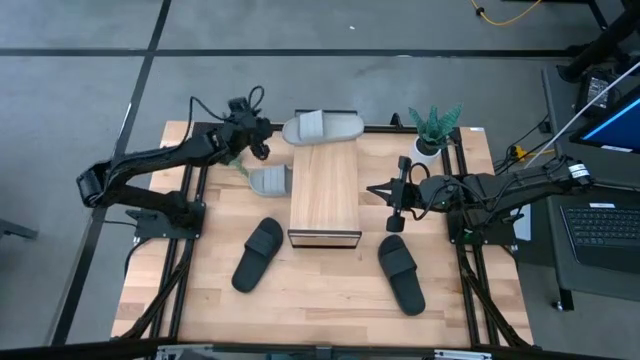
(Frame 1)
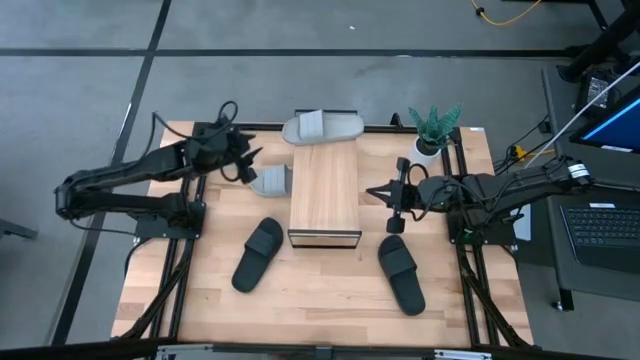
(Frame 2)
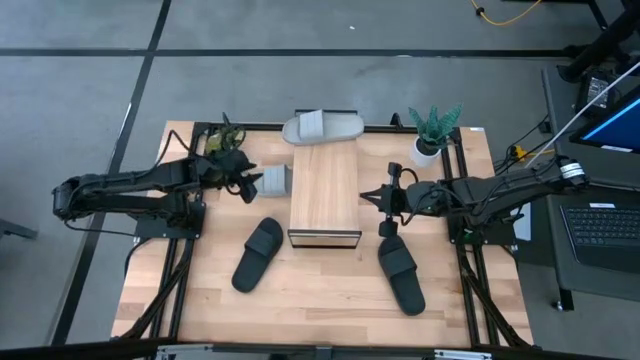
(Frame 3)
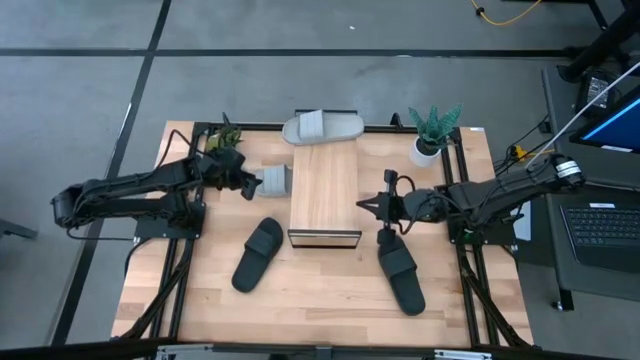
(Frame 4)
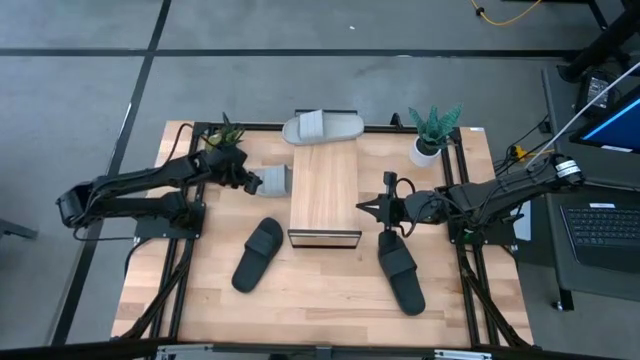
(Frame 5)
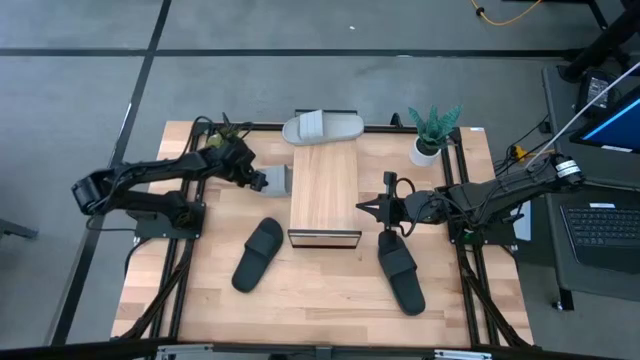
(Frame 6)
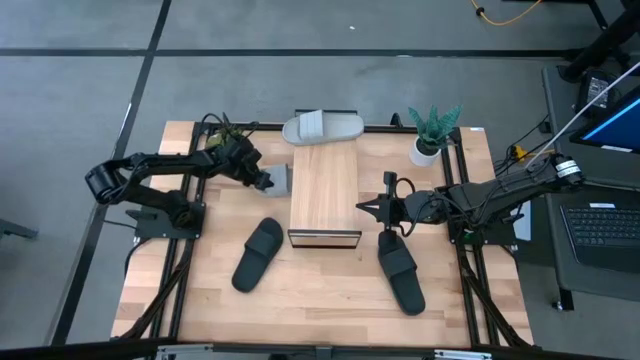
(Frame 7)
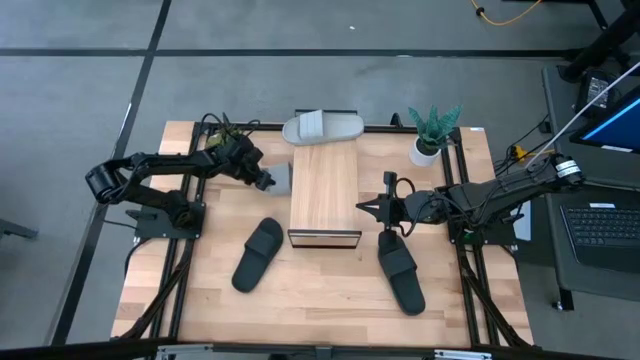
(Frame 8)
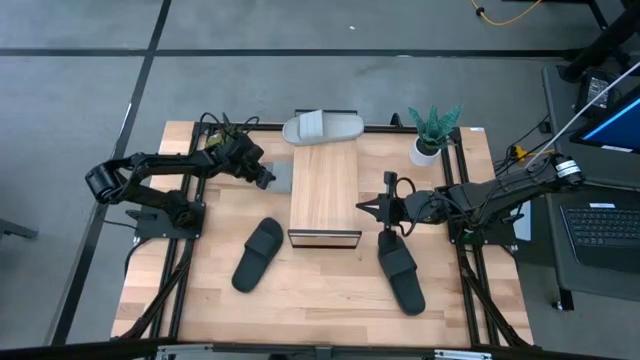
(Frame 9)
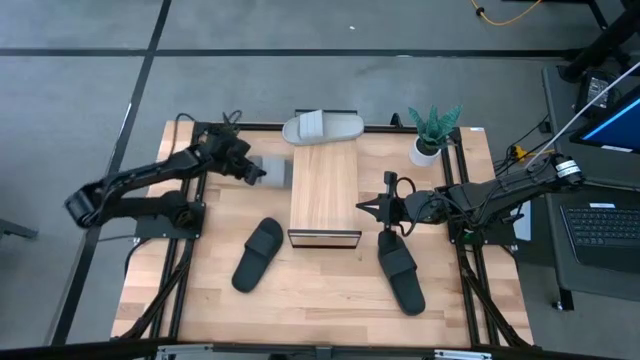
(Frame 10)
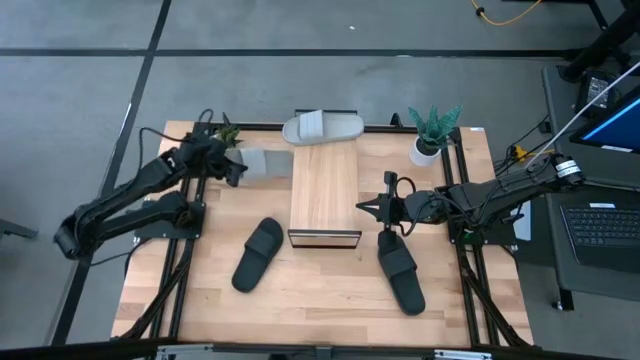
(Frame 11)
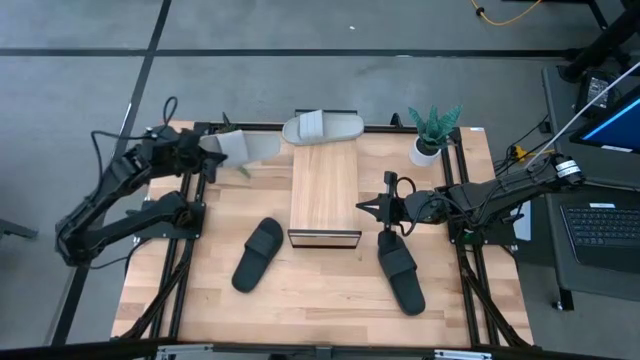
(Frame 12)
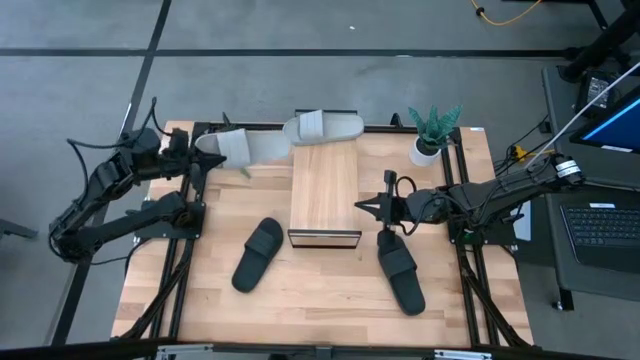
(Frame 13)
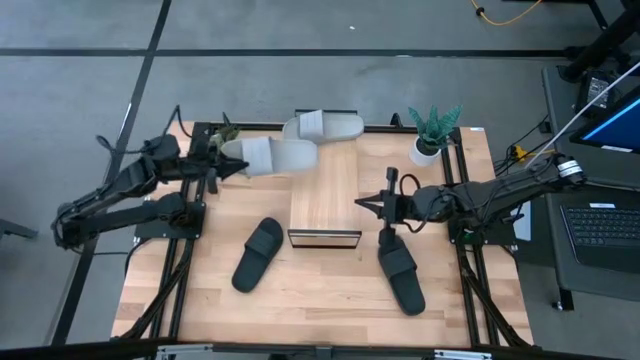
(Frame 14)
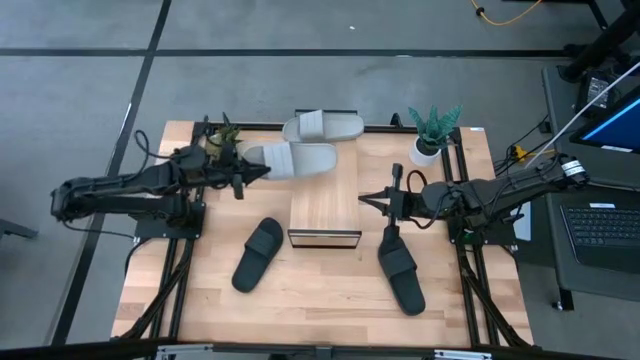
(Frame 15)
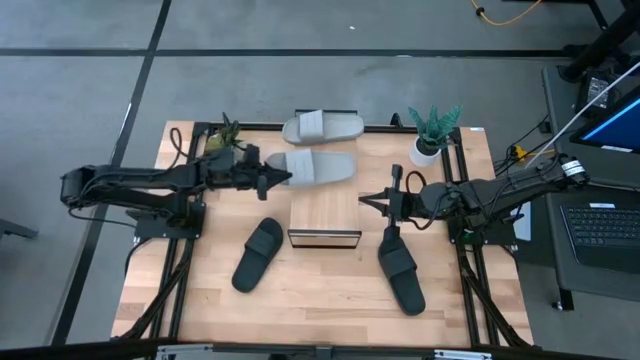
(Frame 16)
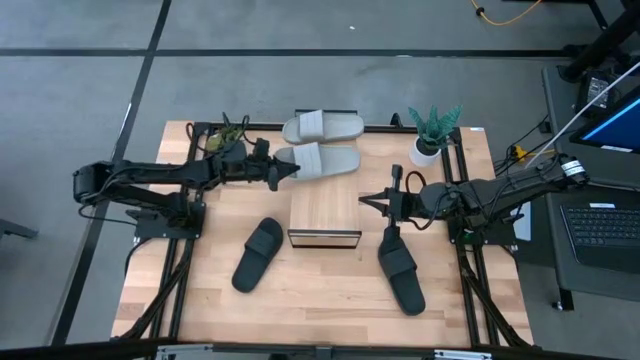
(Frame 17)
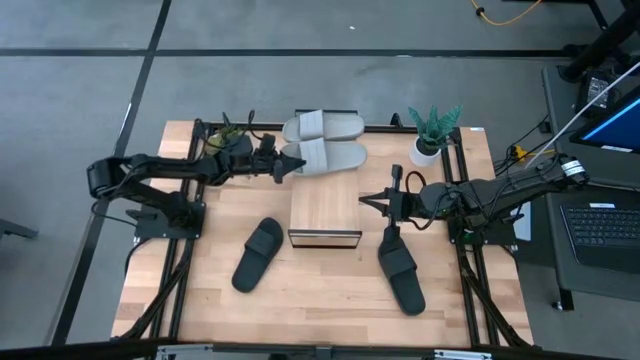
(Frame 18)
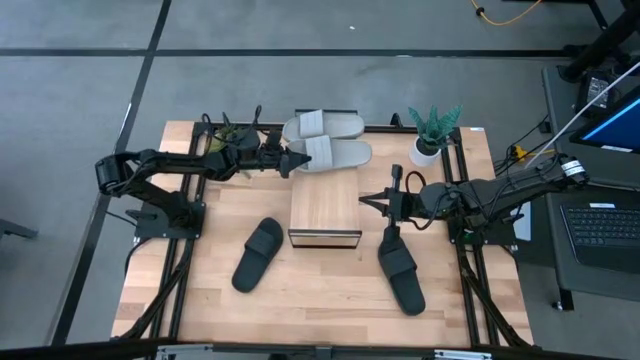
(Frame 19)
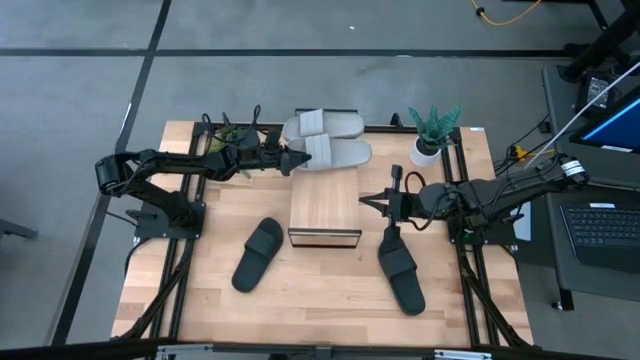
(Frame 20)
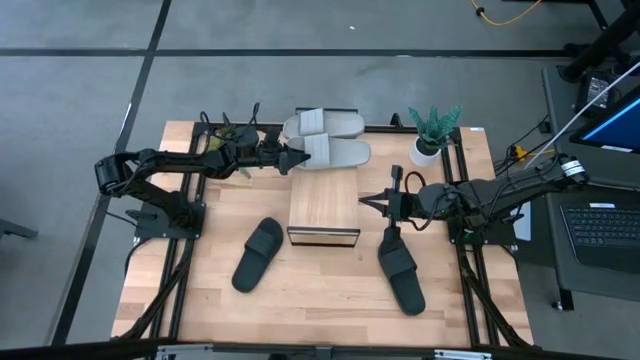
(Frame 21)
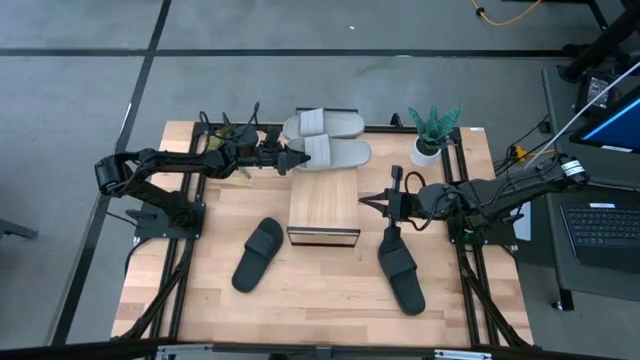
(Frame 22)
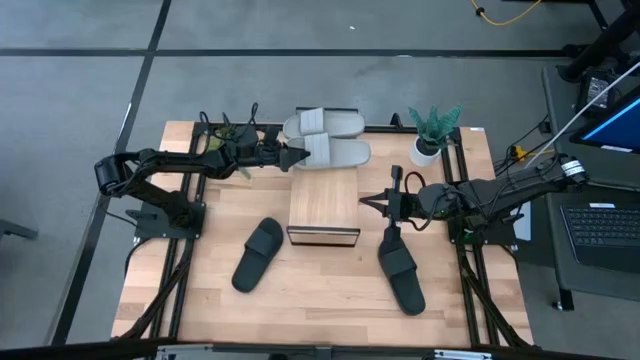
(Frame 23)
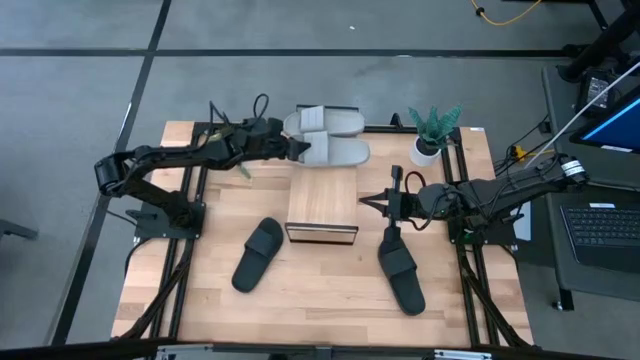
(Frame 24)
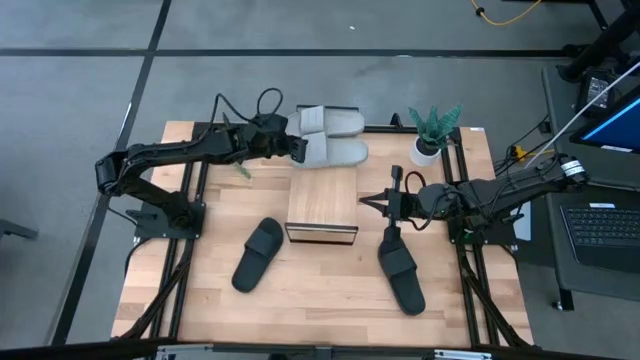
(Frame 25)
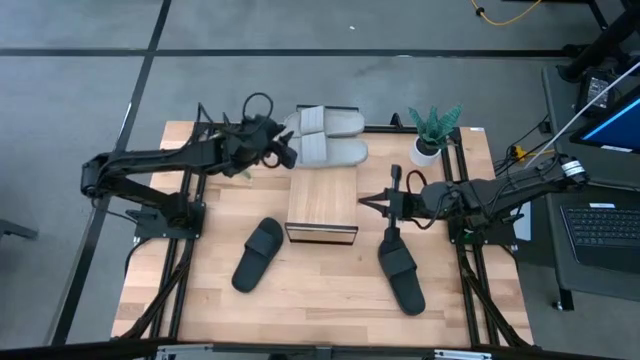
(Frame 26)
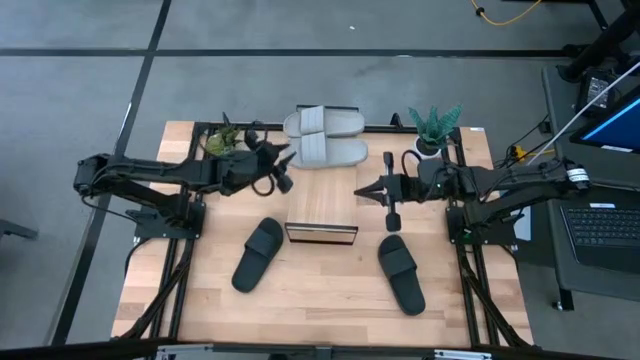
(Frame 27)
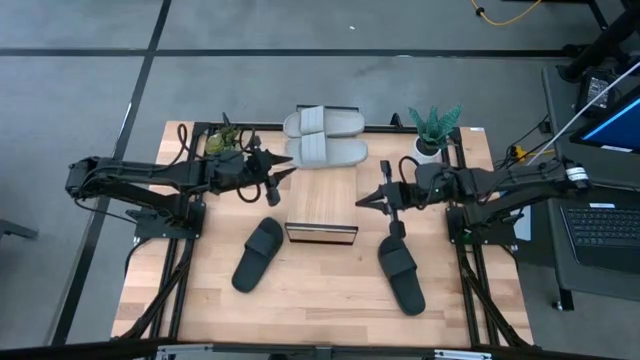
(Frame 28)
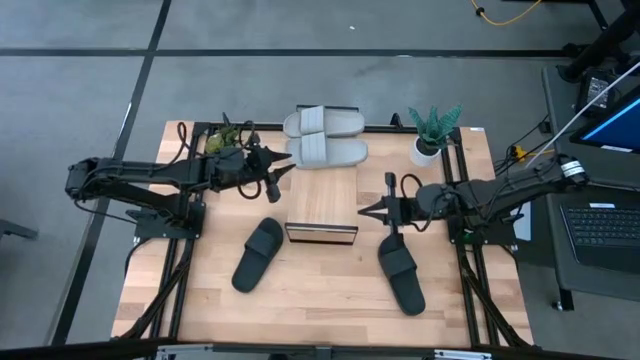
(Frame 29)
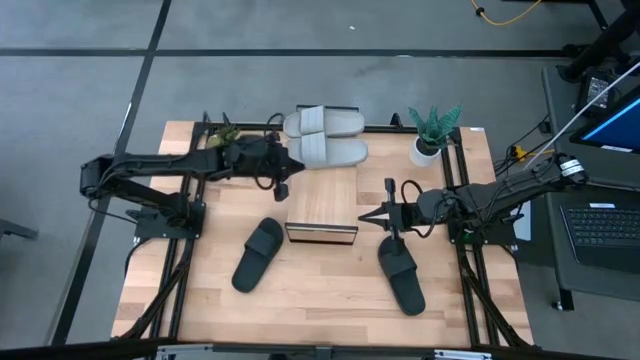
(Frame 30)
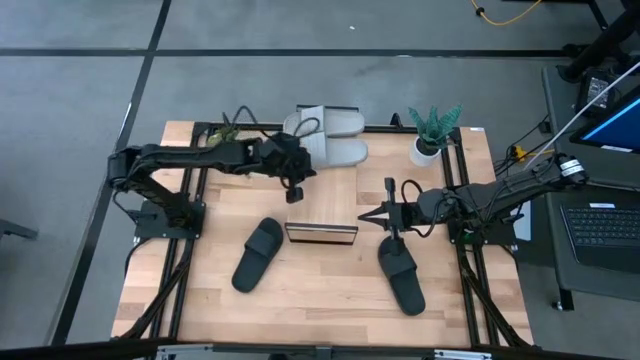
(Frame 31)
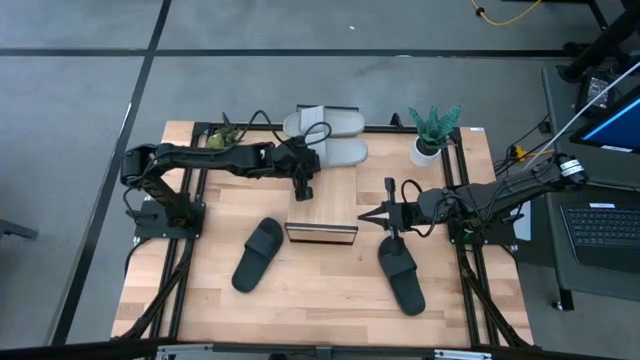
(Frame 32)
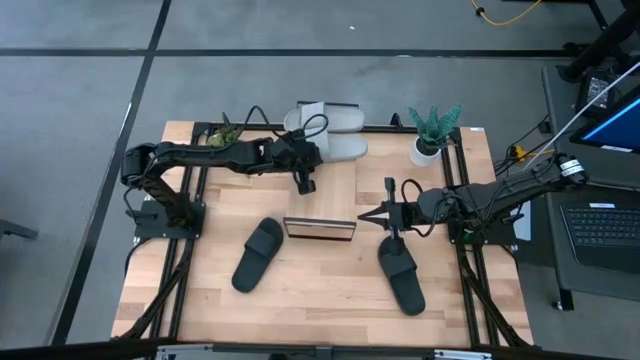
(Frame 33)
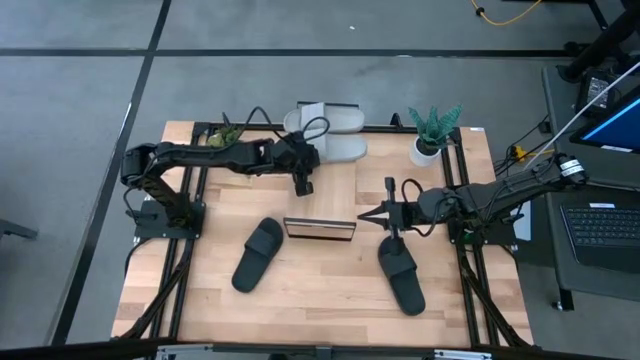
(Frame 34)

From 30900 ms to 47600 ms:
Task: Pick and place slides into the shelf
Put the gray slide on the shelf

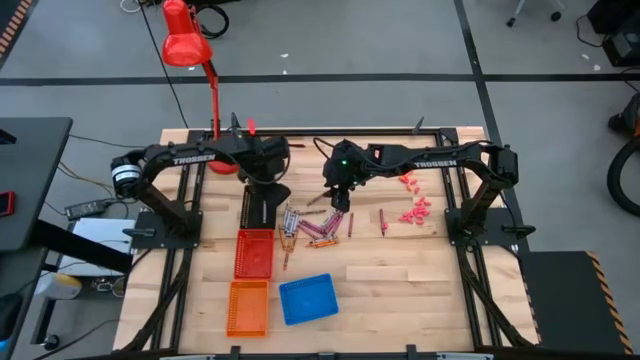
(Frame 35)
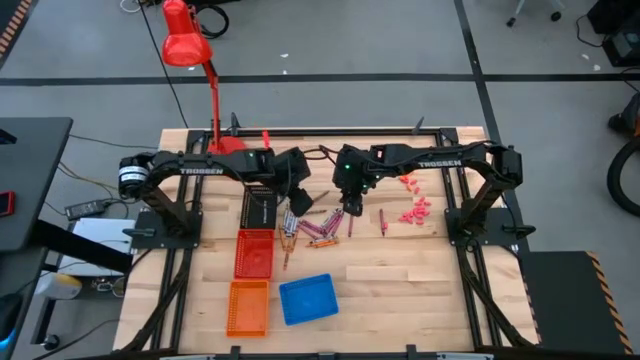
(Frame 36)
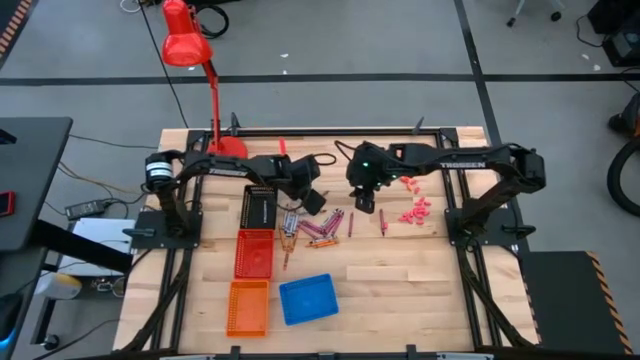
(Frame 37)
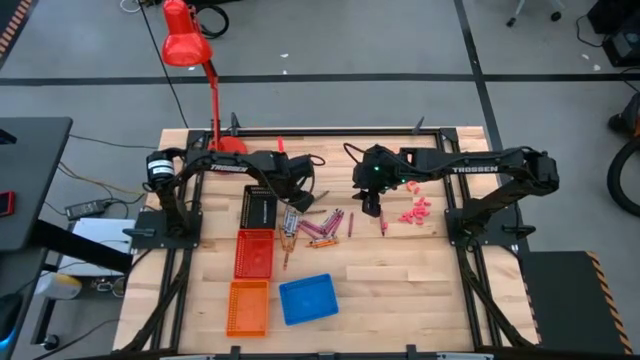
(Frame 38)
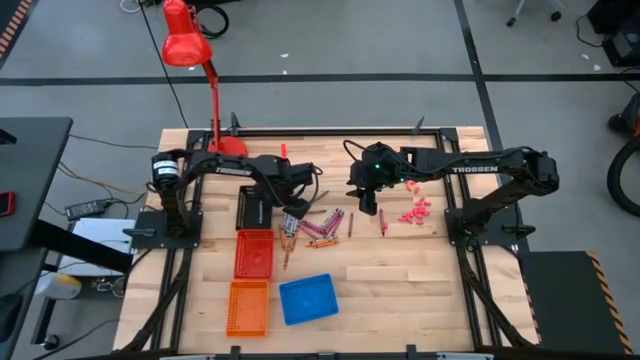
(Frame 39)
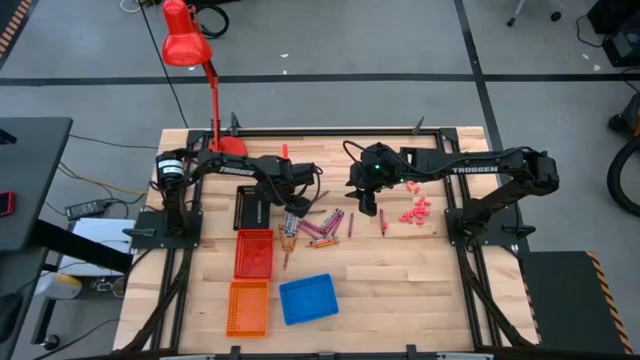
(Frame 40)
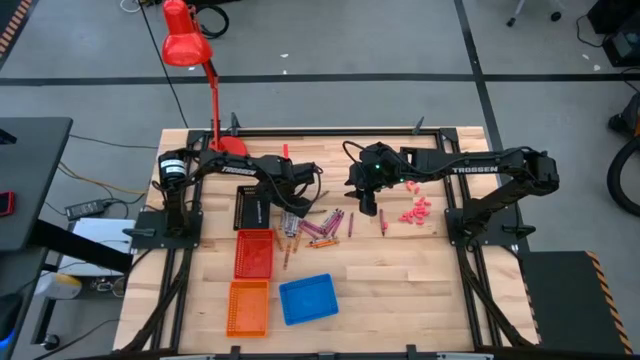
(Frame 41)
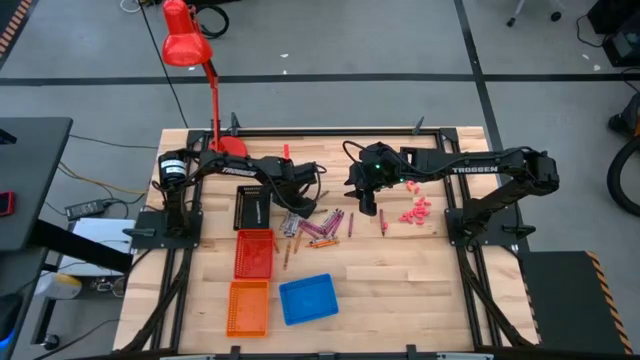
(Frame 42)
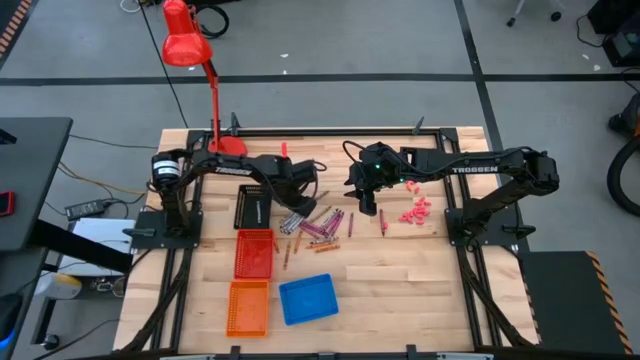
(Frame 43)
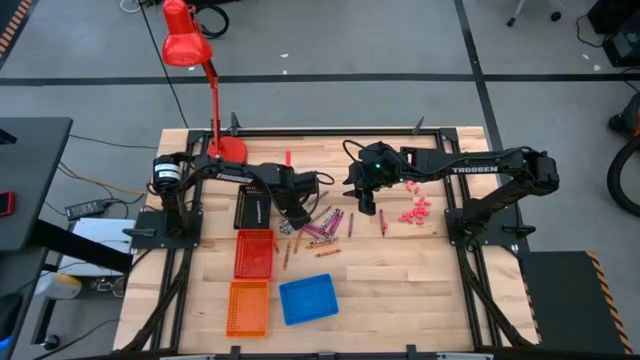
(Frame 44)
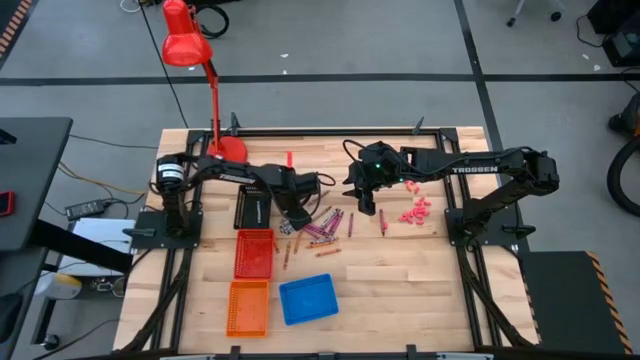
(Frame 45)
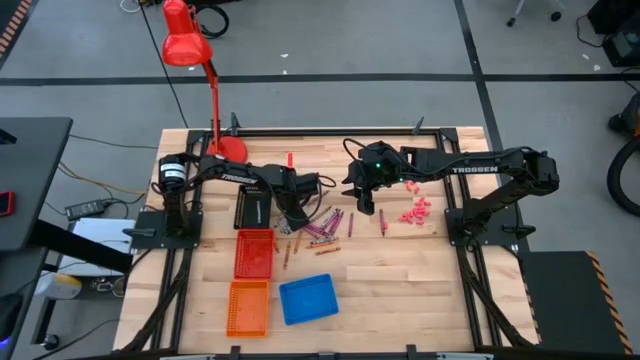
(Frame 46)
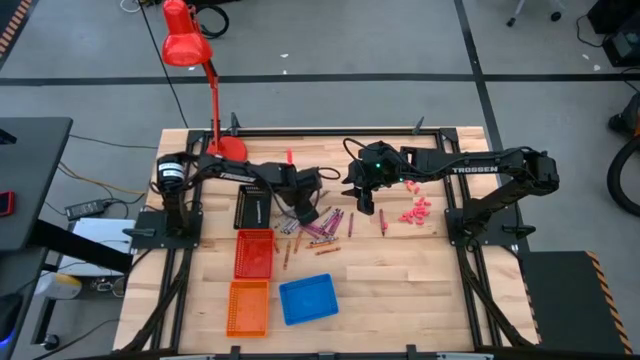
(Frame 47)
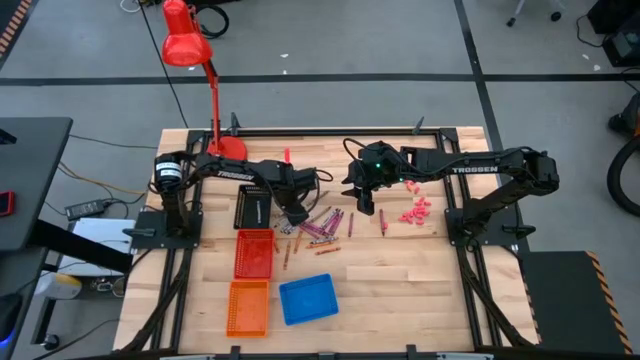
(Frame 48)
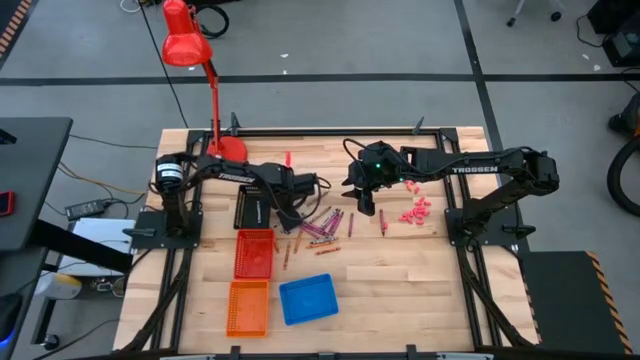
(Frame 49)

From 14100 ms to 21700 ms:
Task: Sort crayons
Put the black crayon into the black bin
